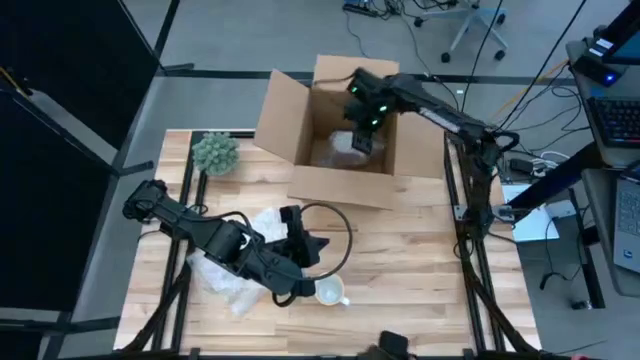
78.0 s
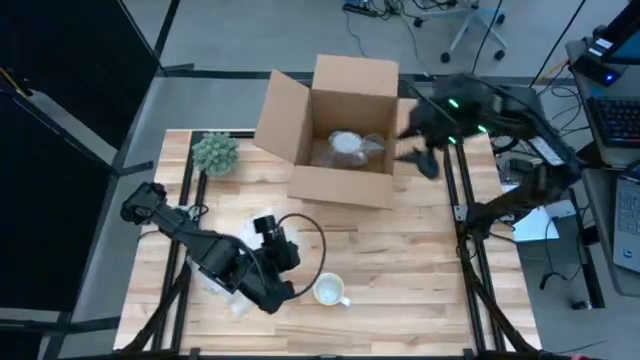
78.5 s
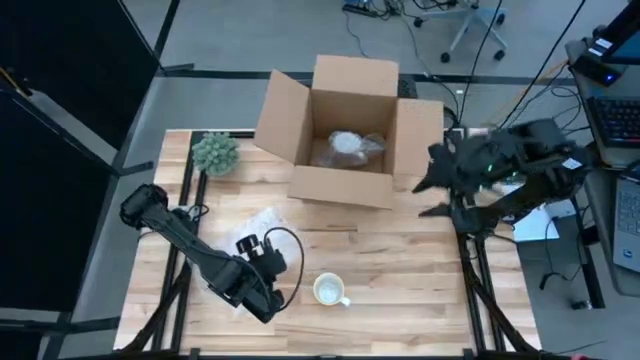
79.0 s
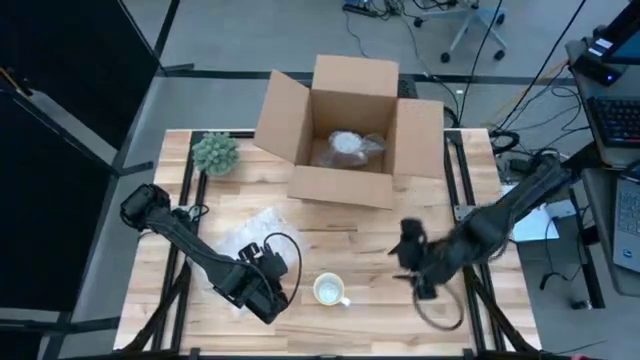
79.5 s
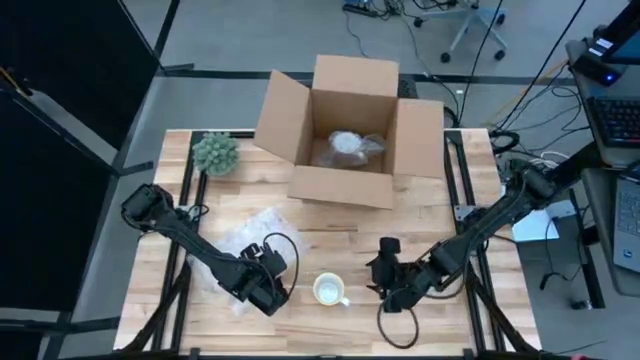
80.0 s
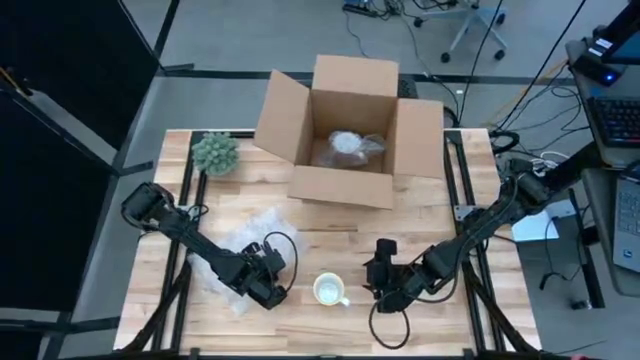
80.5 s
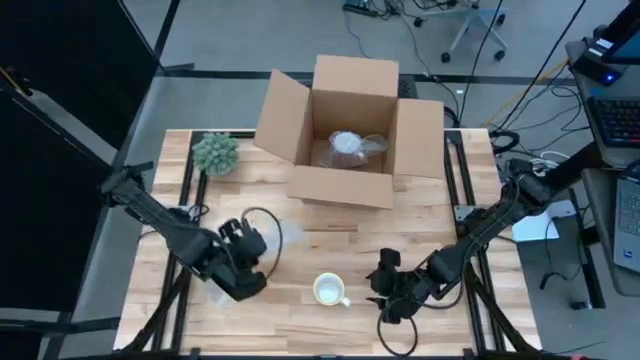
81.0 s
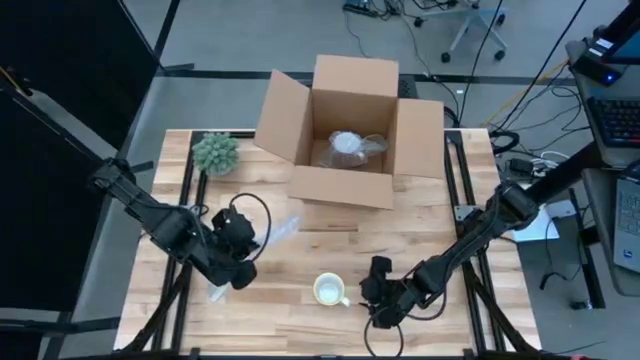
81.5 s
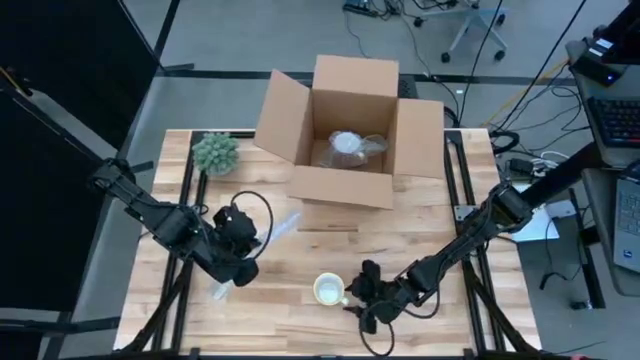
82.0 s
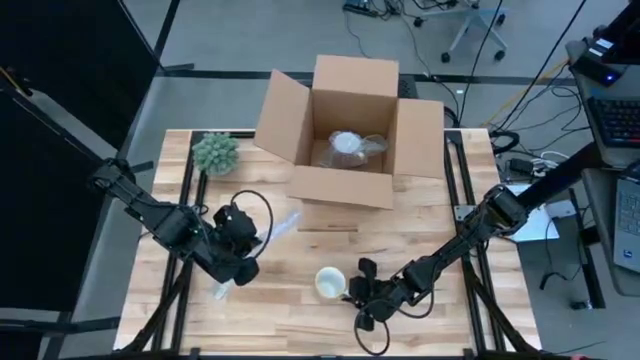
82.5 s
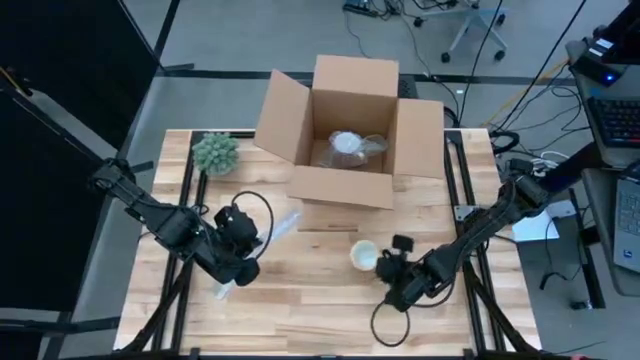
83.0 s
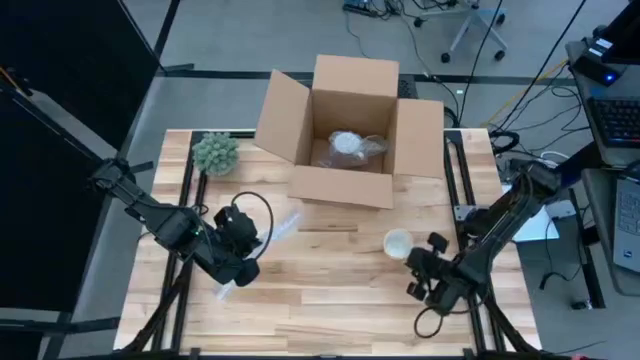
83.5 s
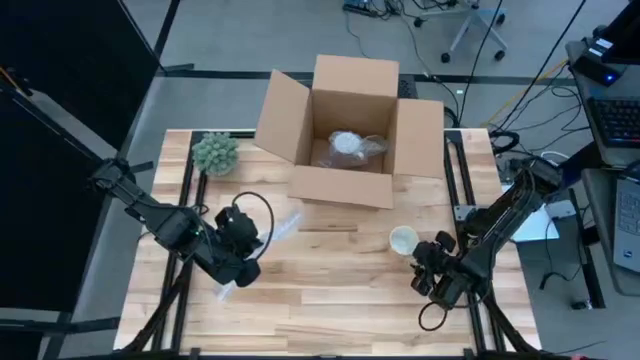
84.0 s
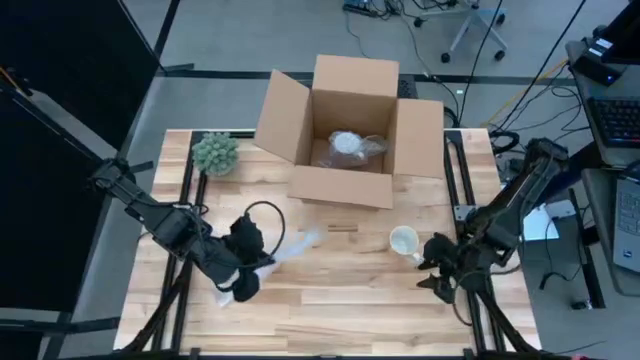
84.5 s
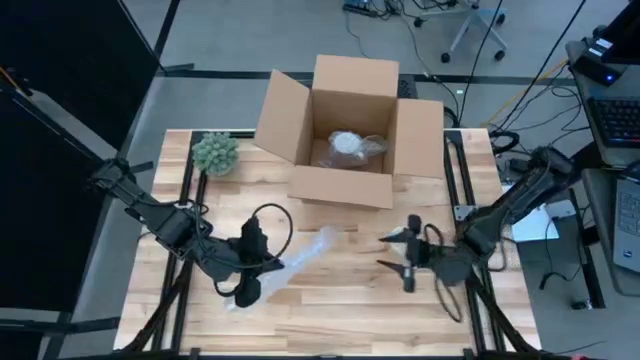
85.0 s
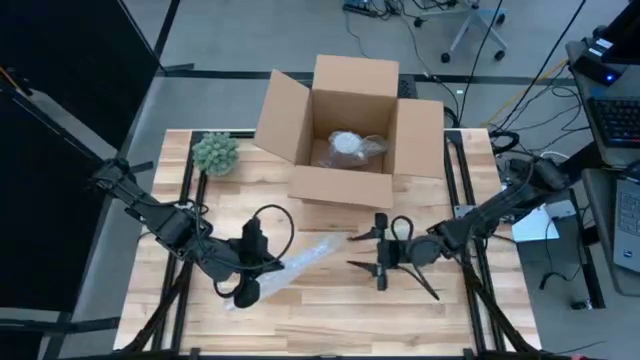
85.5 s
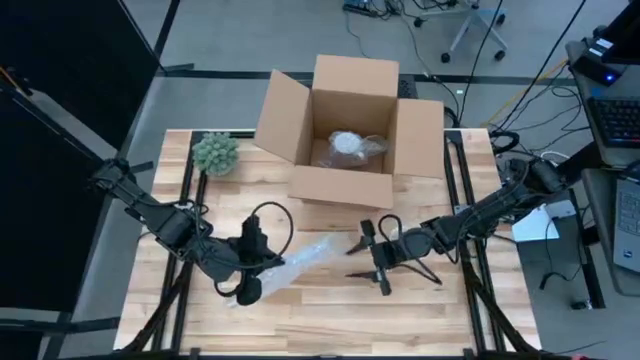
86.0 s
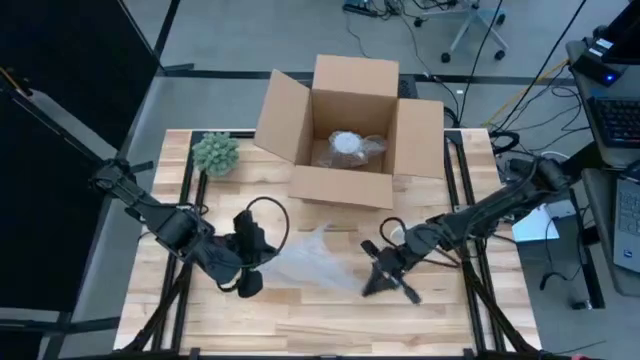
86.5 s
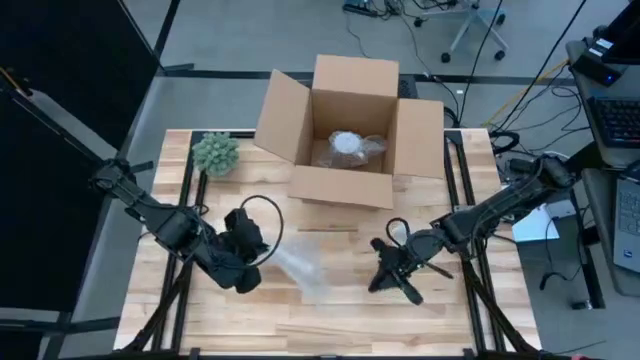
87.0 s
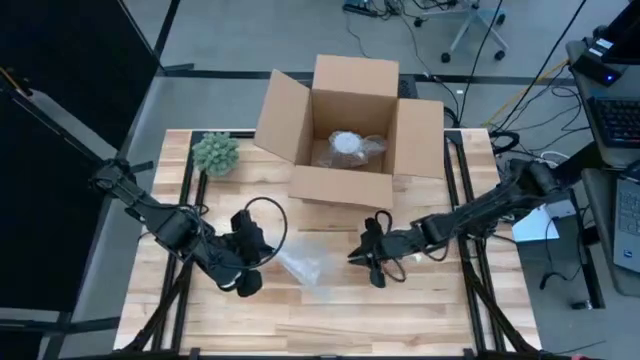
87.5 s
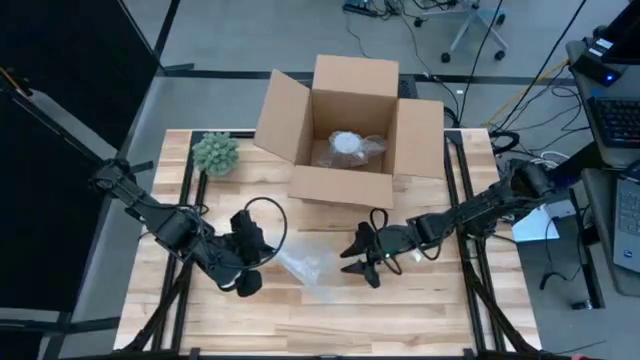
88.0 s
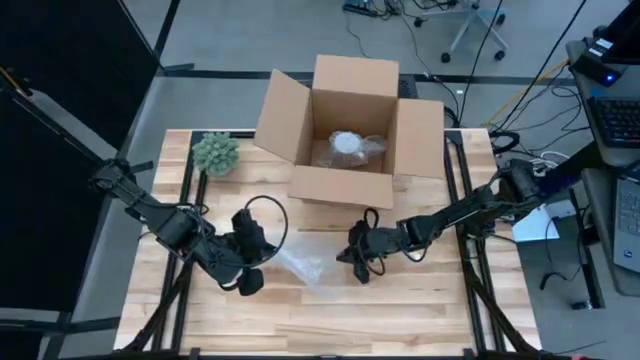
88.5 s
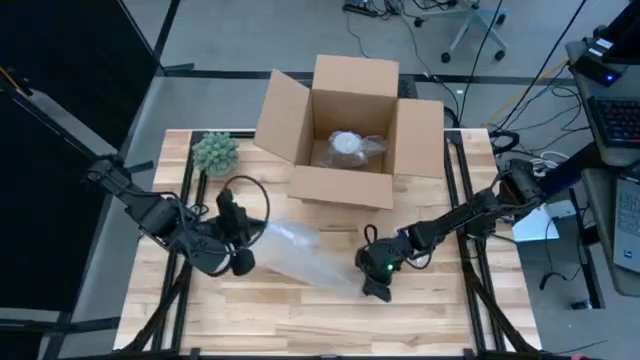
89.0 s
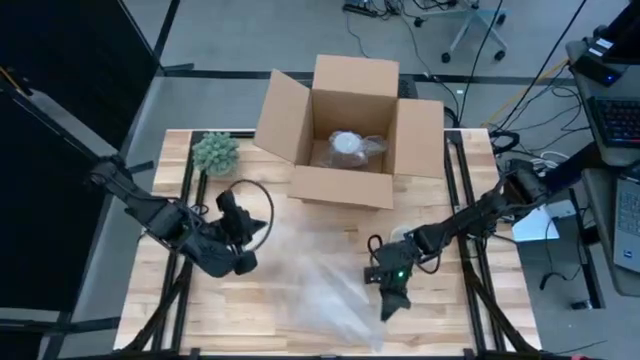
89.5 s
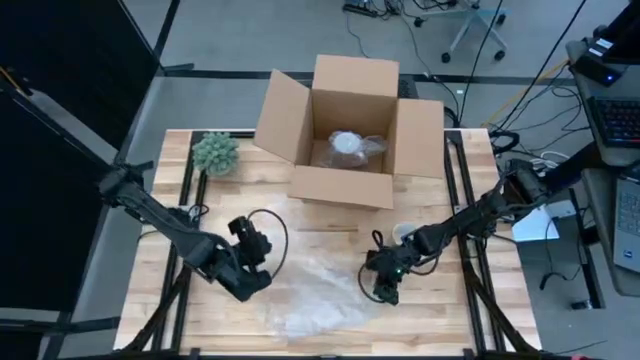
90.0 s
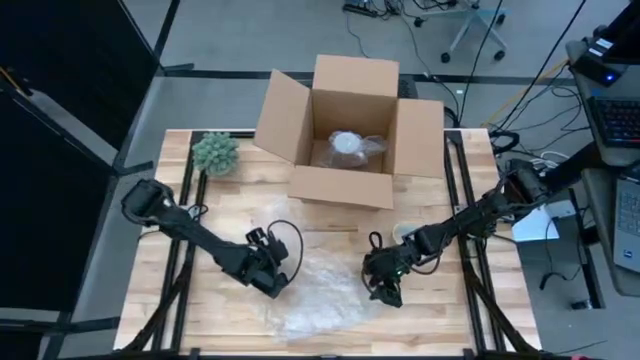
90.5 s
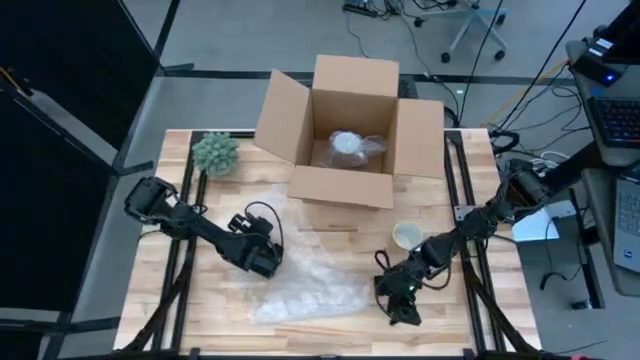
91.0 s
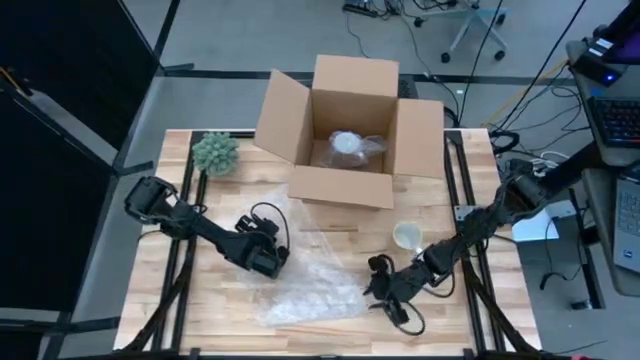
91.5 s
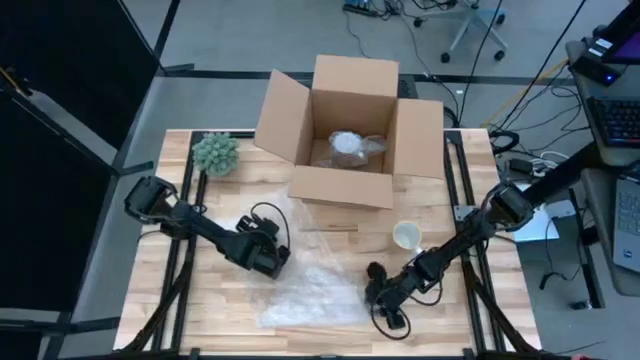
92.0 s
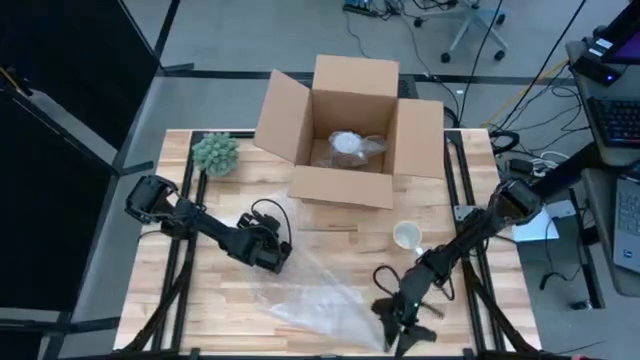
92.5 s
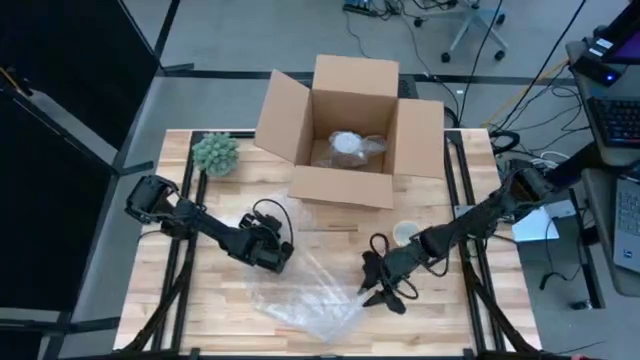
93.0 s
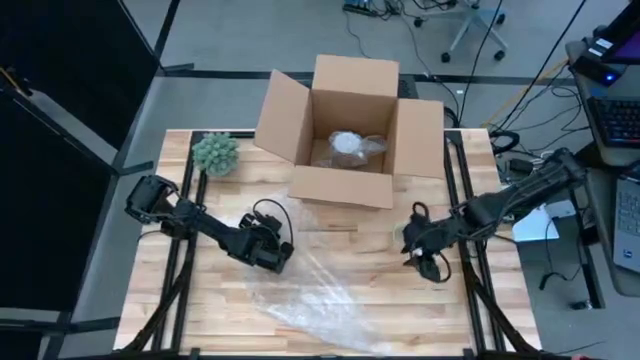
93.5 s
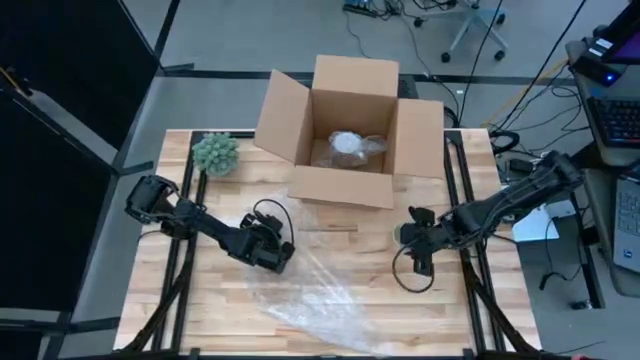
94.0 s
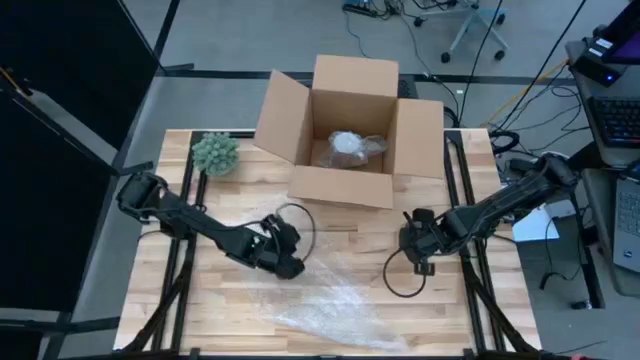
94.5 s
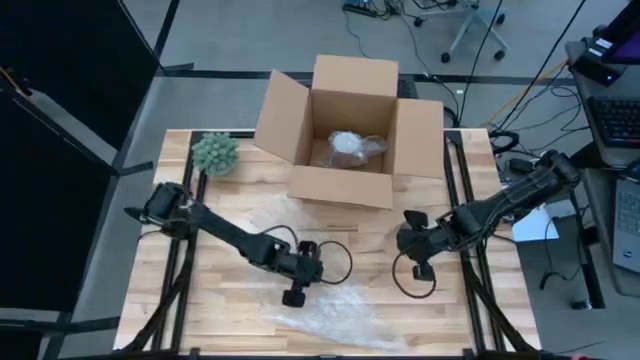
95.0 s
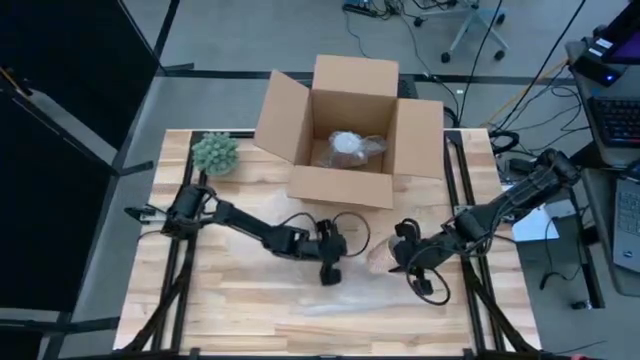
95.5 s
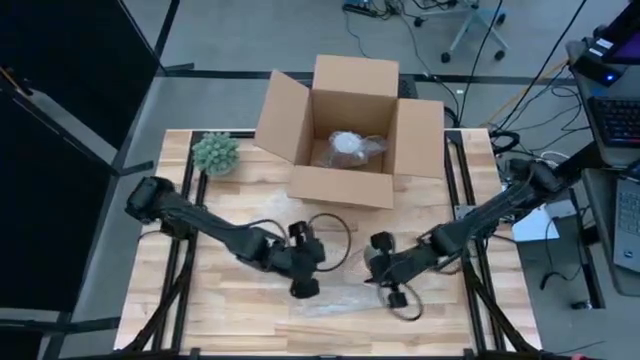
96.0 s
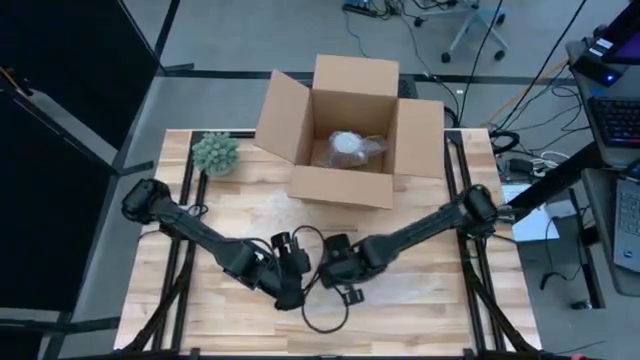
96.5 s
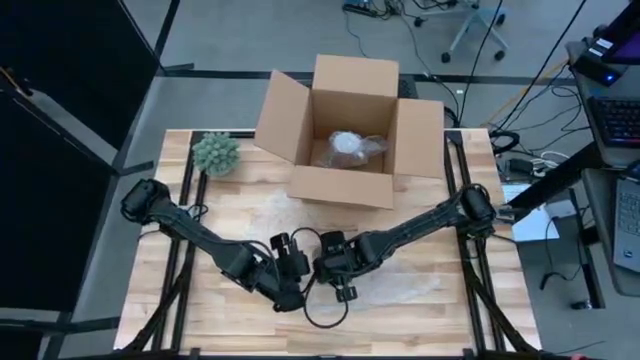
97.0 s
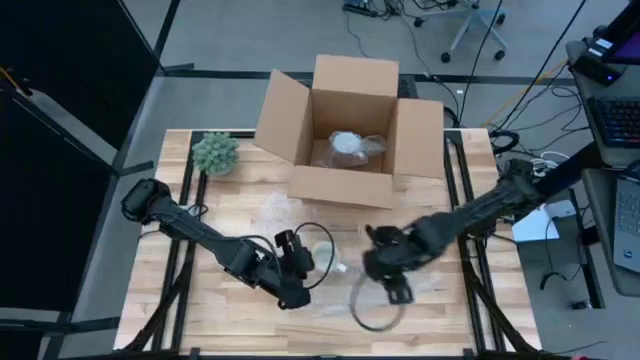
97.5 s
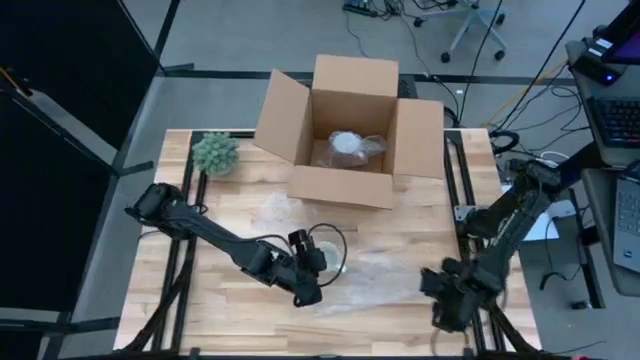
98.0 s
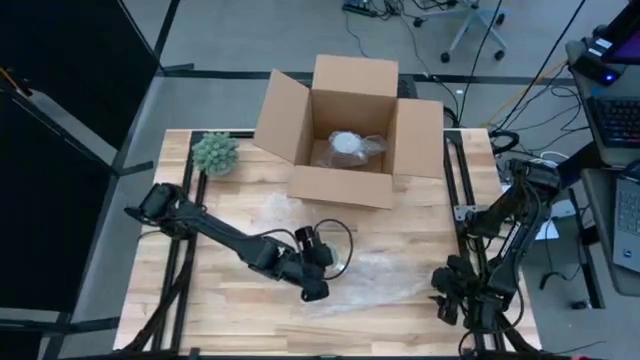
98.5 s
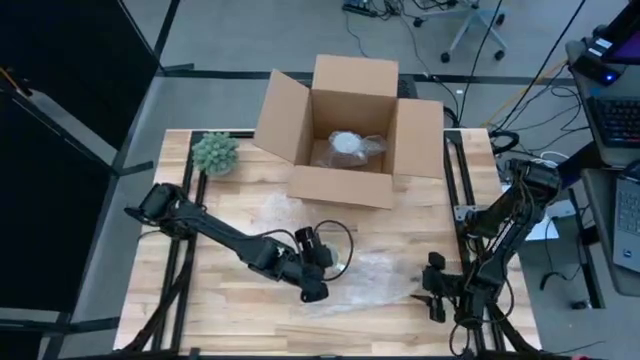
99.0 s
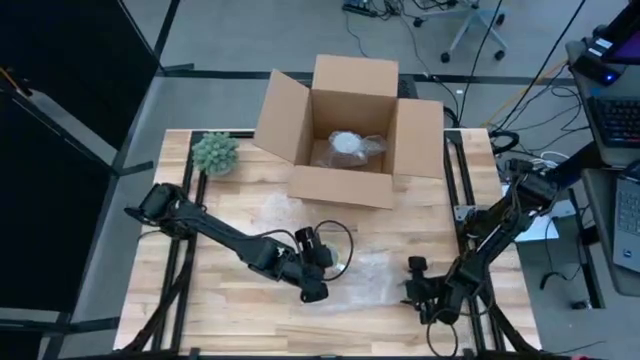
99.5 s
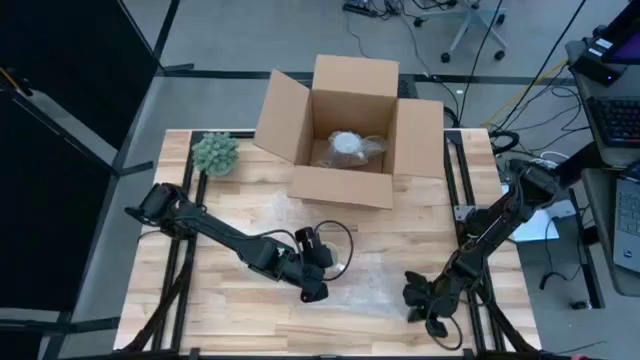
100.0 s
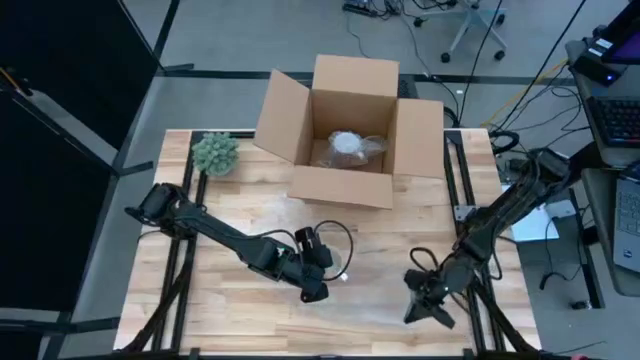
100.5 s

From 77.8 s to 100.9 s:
Task: wrap mug
Wrap the orange mug with bubble wrap
